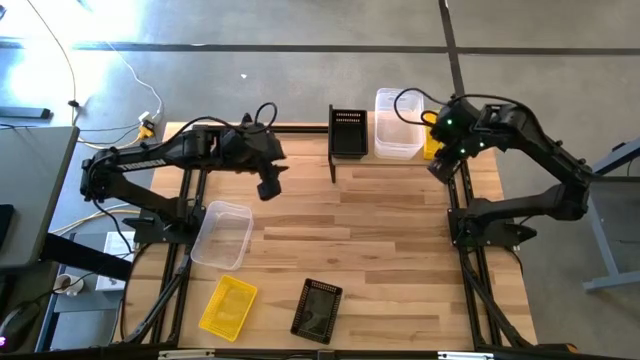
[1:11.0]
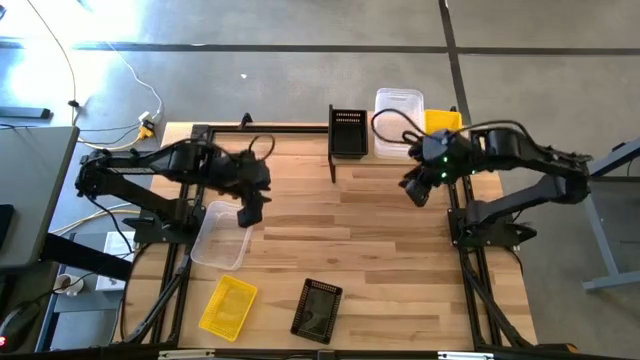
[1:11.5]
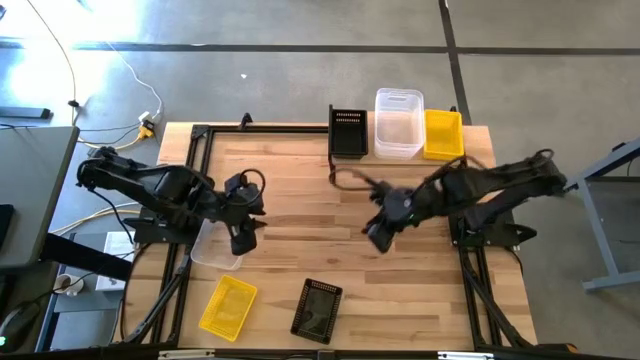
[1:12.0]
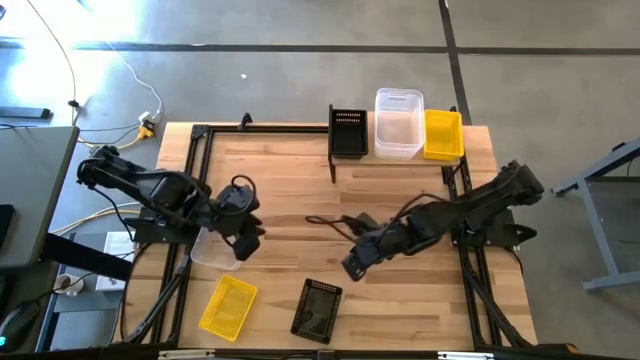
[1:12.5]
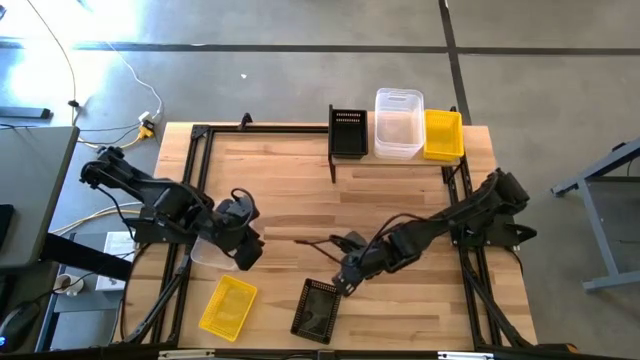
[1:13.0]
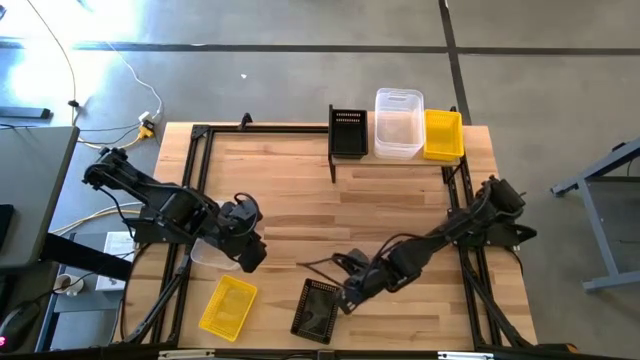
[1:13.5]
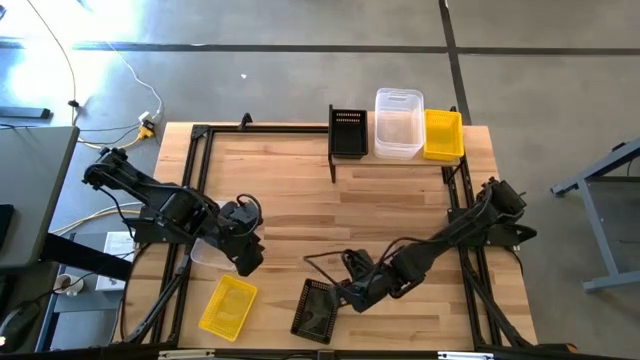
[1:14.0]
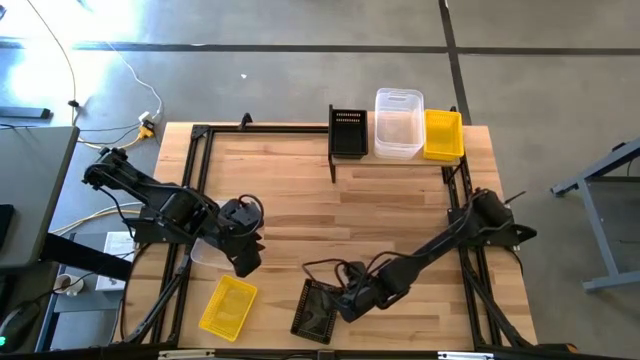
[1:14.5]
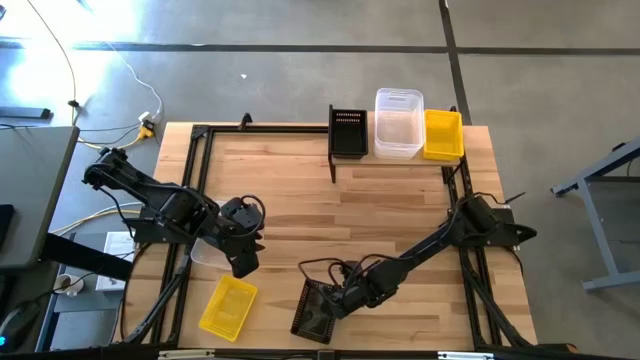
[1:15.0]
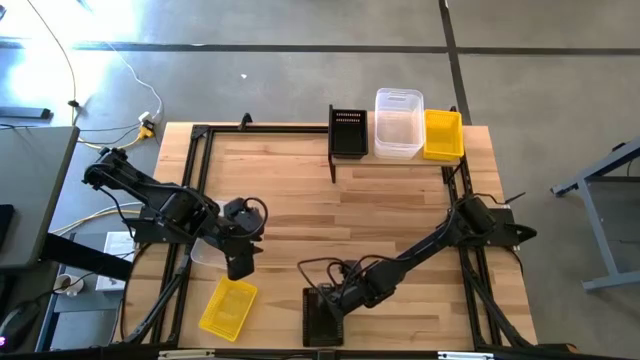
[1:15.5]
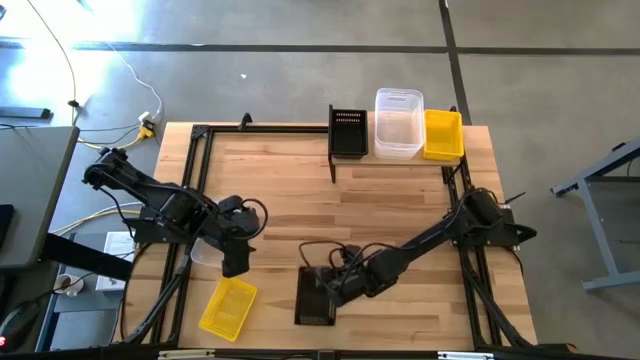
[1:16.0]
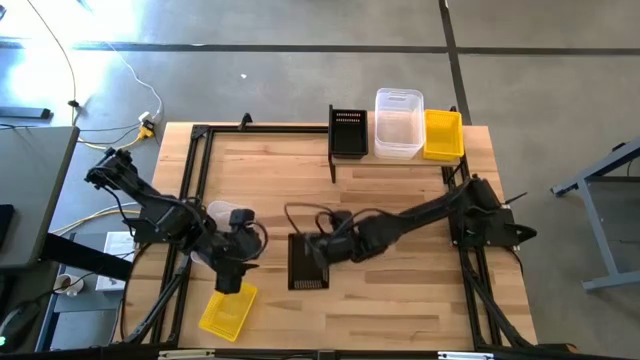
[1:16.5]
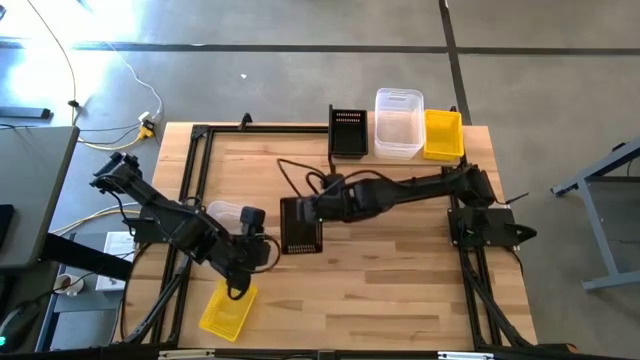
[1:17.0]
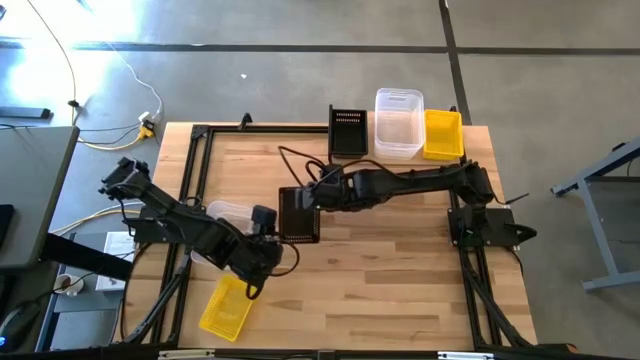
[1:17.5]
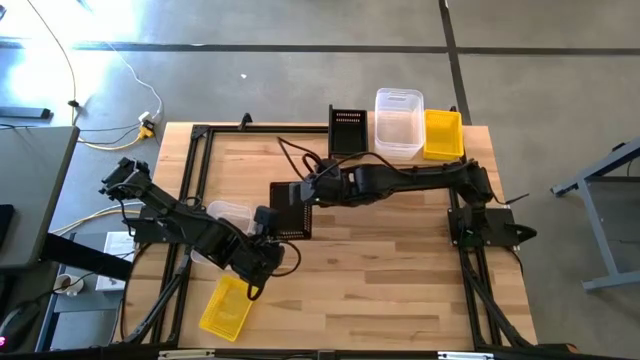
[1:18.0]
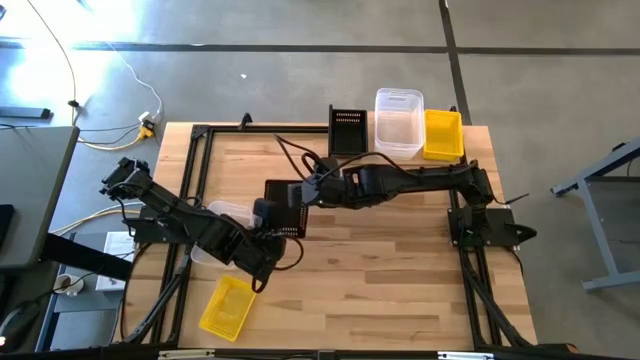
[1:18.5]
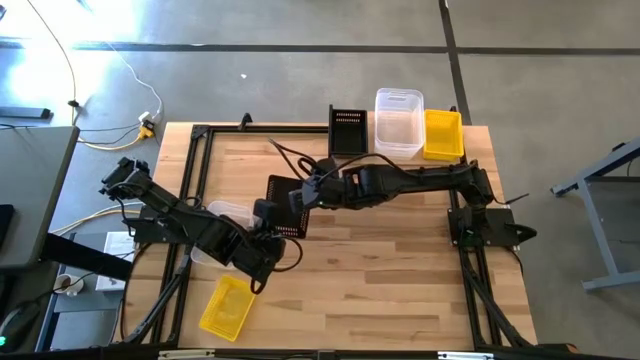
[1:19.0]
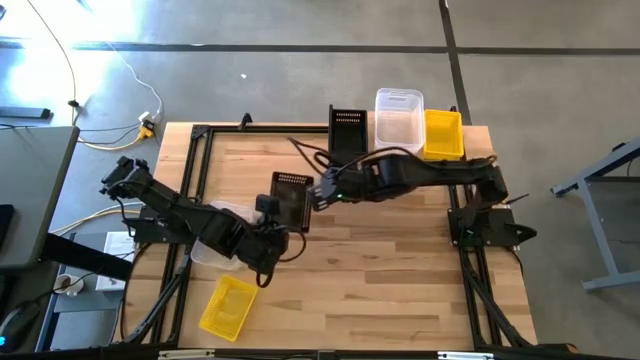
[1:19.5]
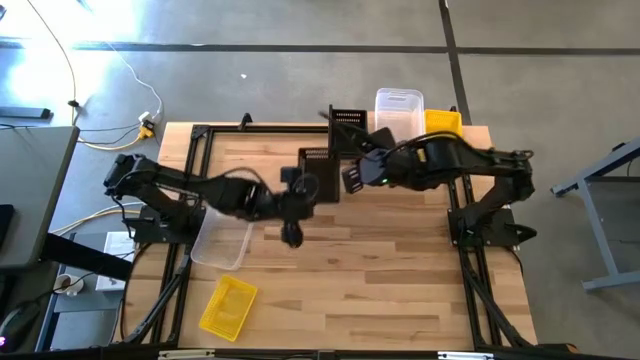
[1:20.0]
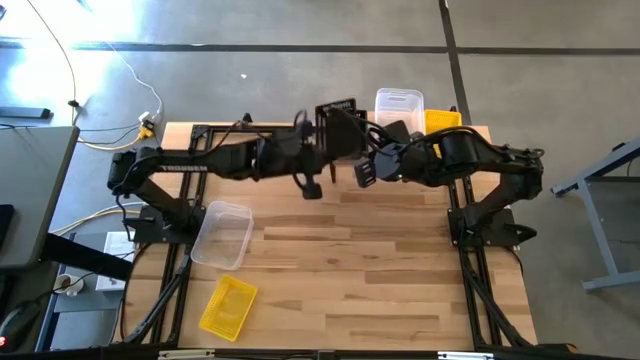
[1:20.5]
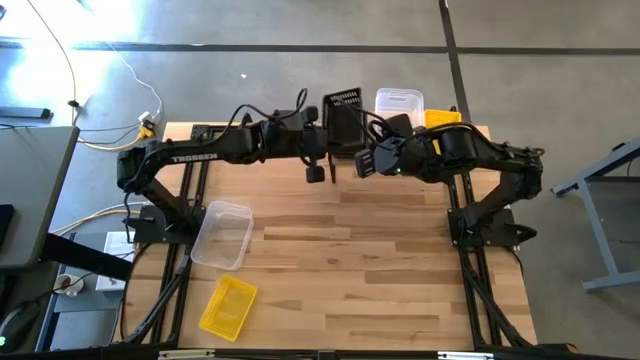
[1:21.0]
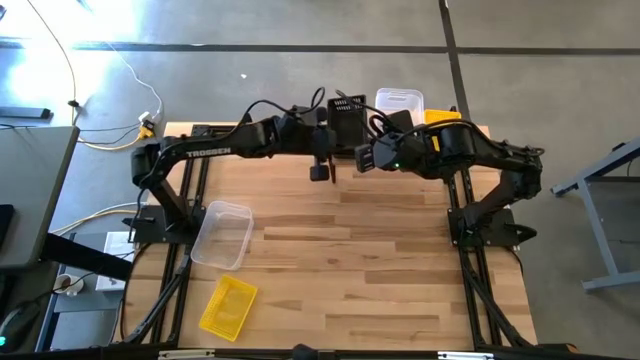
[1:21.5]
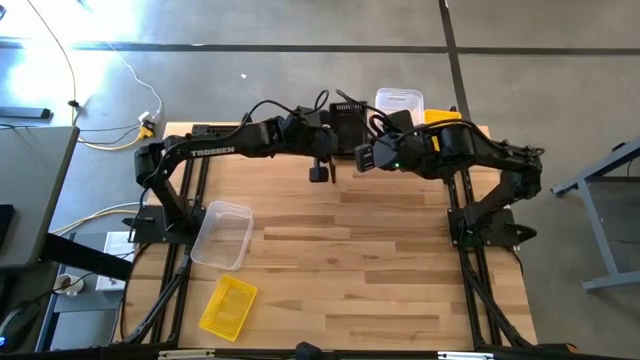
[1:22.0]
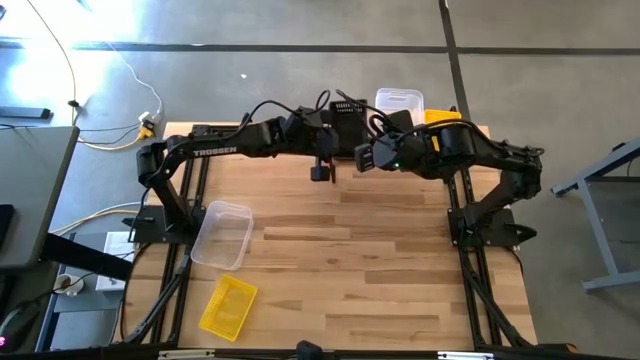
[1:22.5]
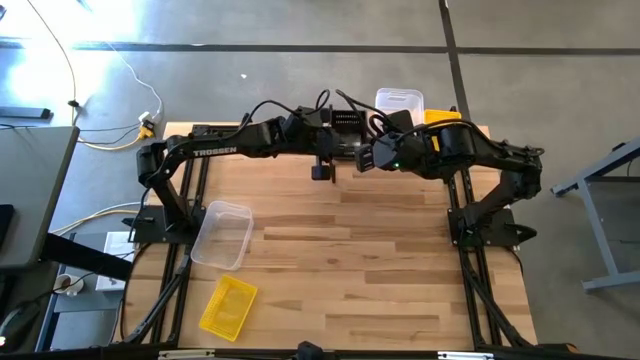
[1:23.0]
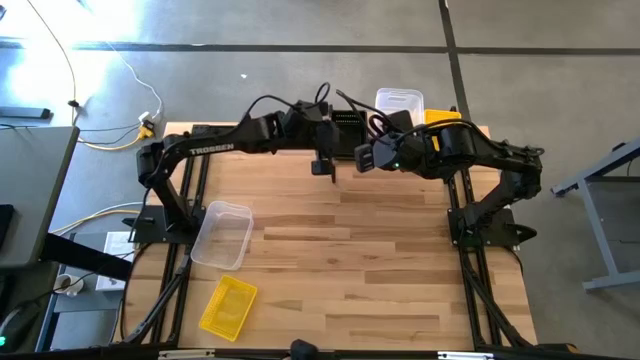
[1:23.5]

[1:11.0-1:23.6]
Task: Stack baskets on shelf by color
Stack the black bin on top of the stacked black bins on the shelf

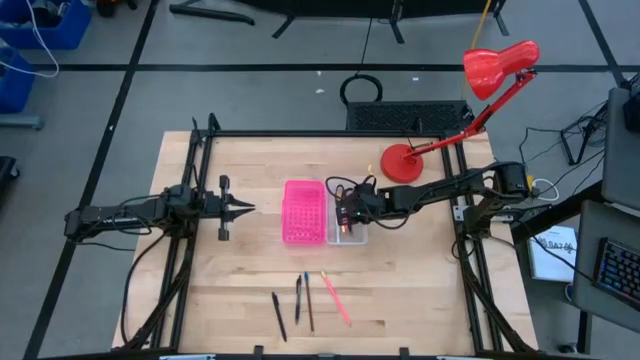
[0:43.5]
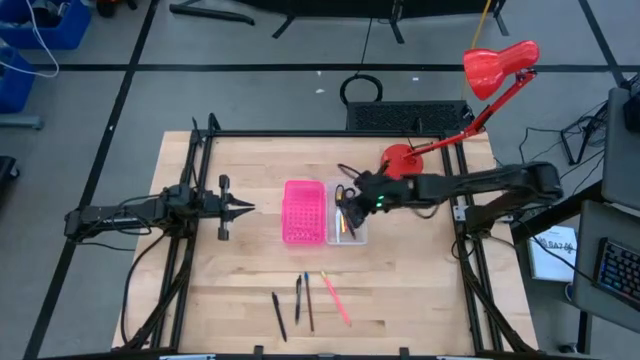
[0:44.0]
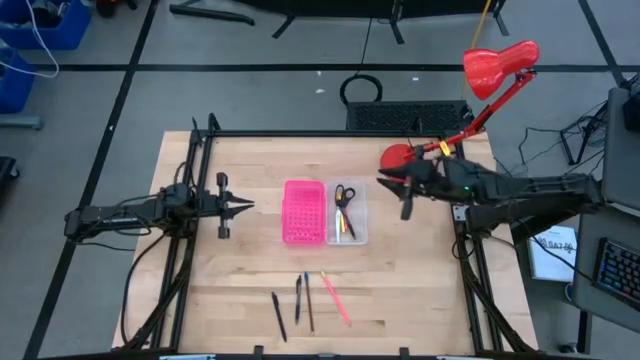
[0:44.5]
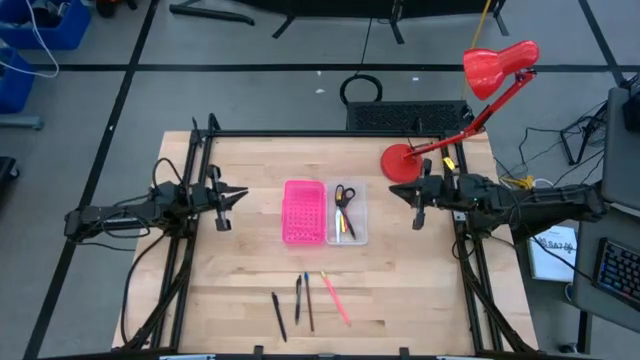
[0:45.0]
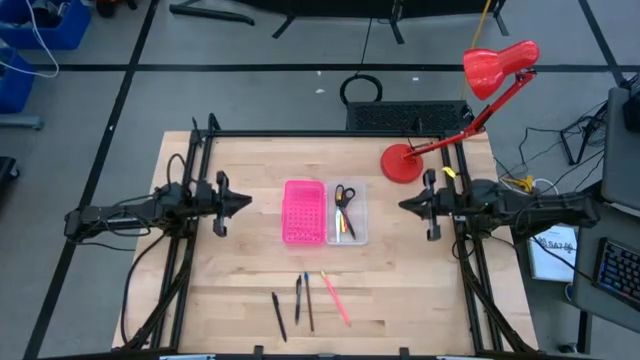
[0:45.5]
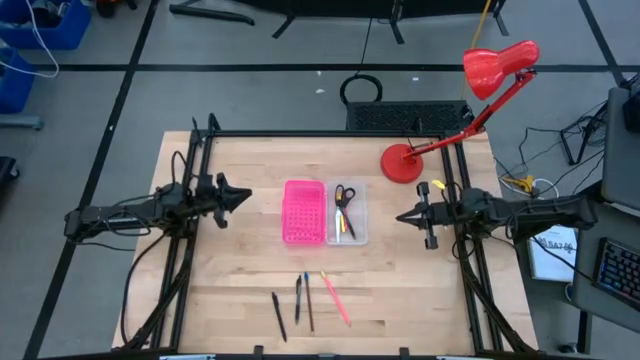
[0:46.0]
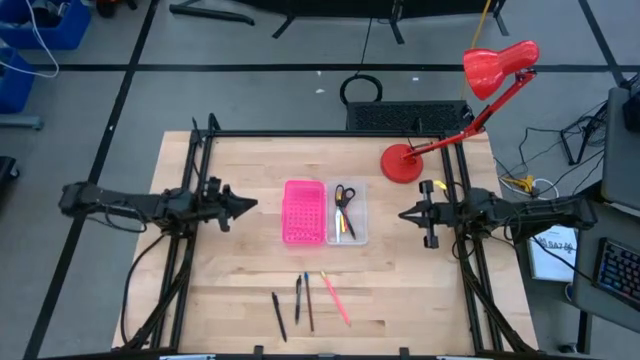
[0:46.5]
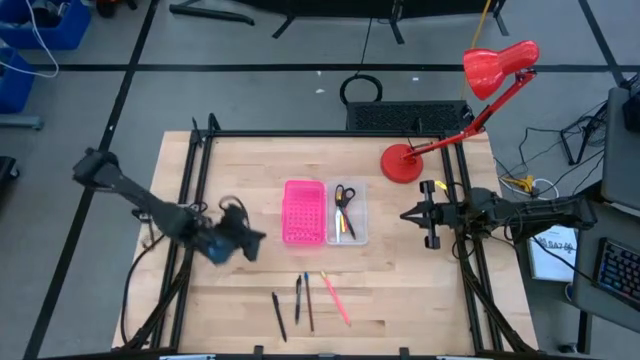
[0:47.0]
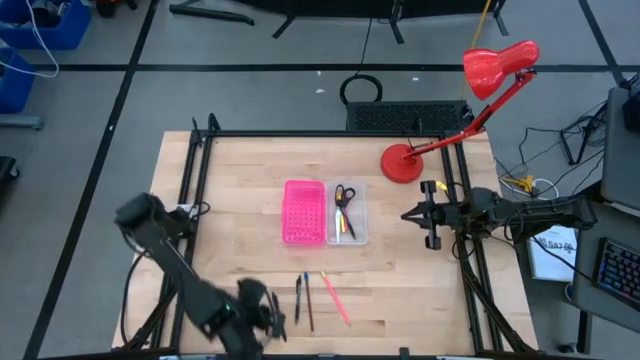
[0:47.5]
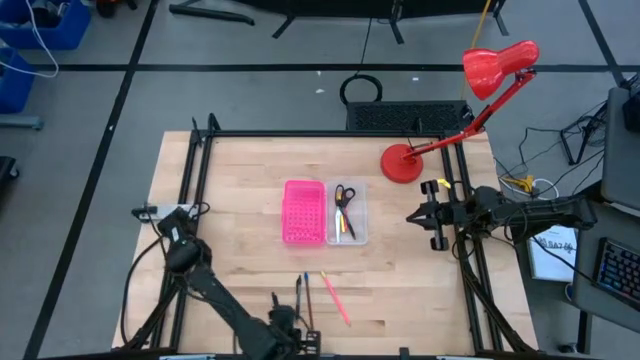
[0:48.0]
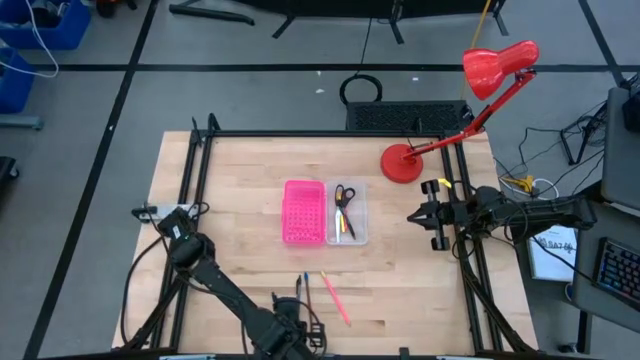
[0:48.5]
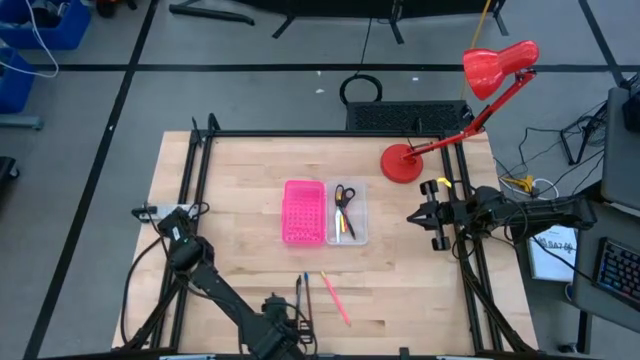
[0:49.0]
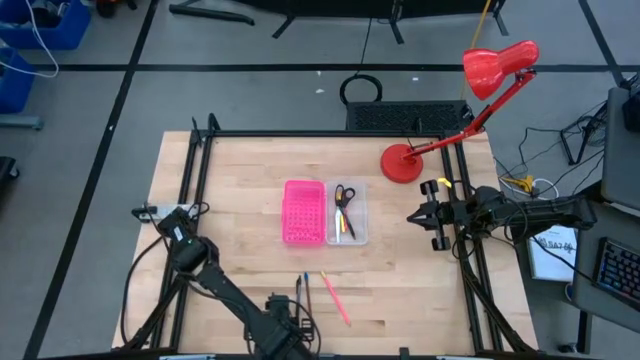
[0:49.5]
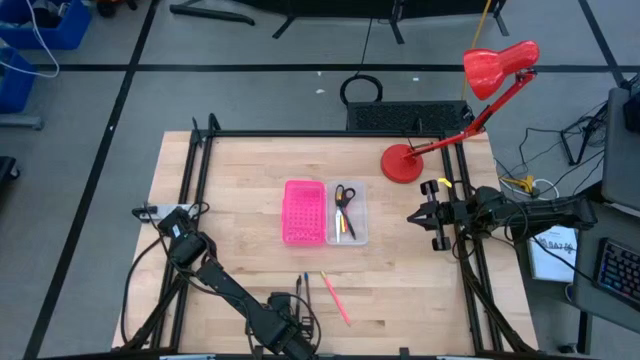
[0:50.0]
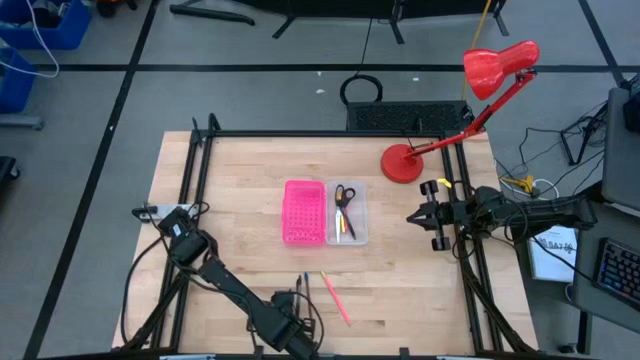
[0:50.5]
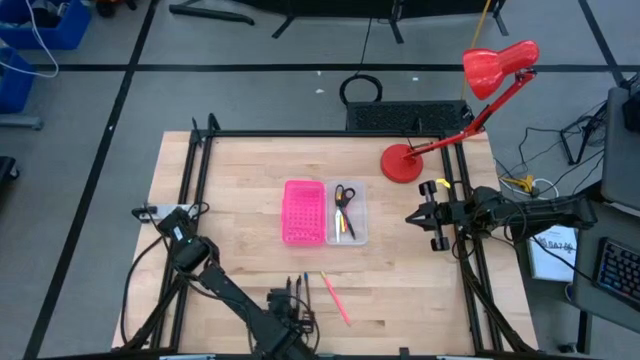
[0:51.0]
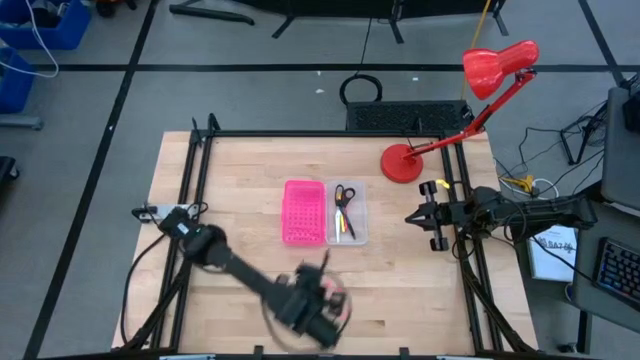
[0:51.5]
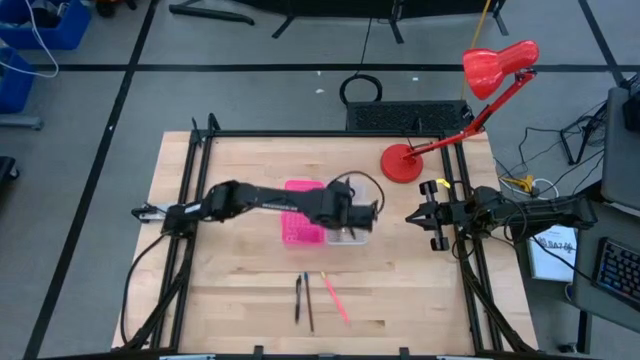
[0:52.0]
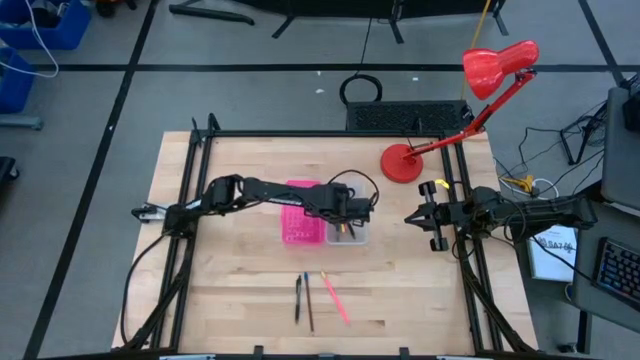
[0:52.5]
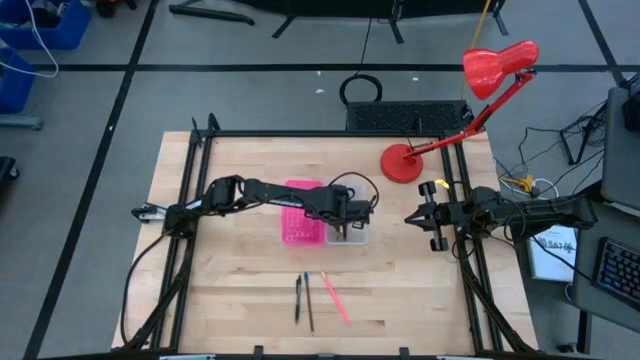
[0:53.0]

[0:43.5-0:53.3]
Task: Pick & place school supplies into a supply box
Put the black pen into the supply box
